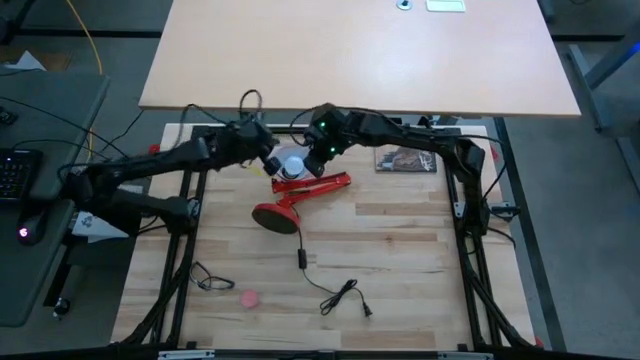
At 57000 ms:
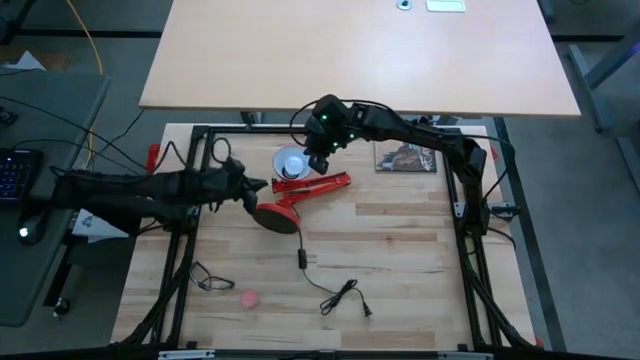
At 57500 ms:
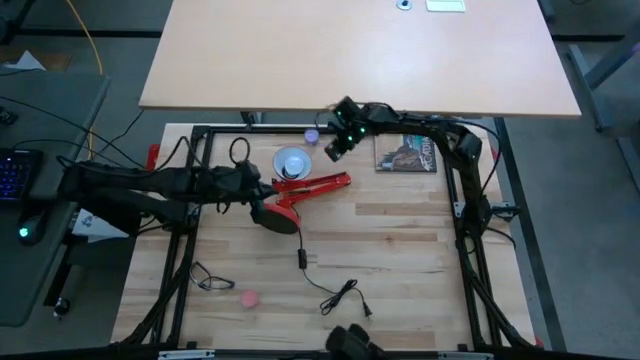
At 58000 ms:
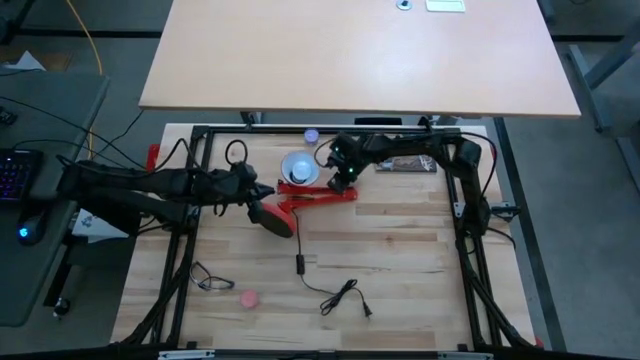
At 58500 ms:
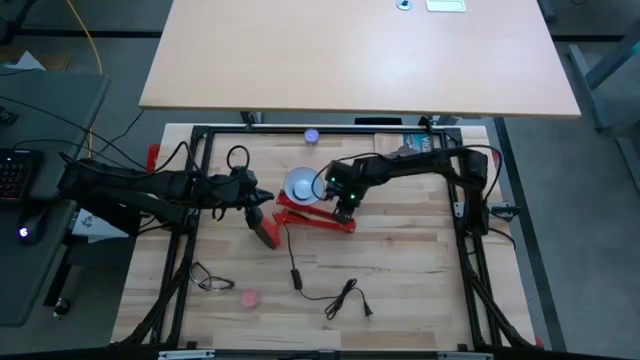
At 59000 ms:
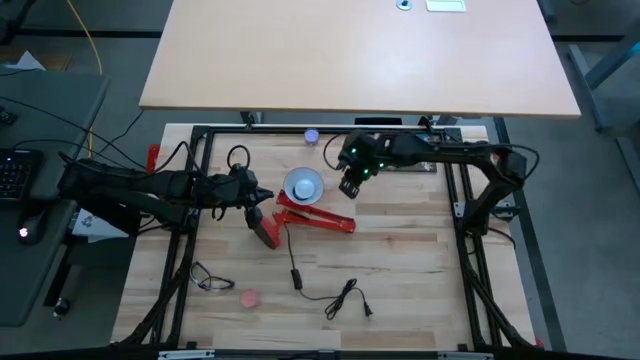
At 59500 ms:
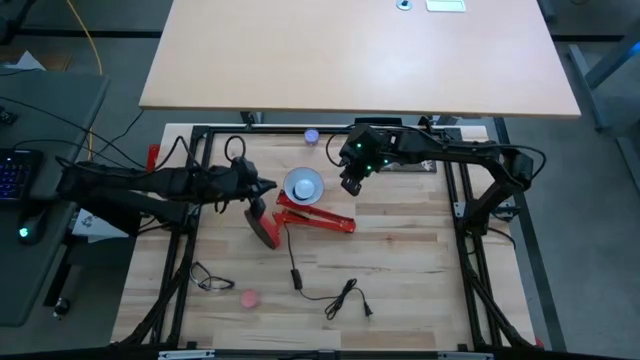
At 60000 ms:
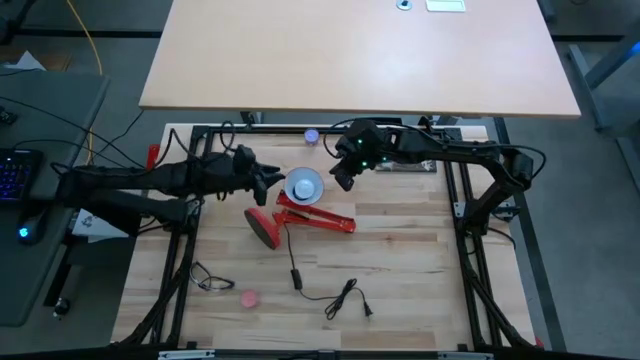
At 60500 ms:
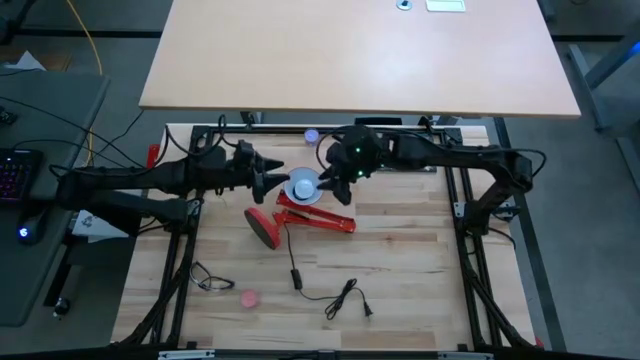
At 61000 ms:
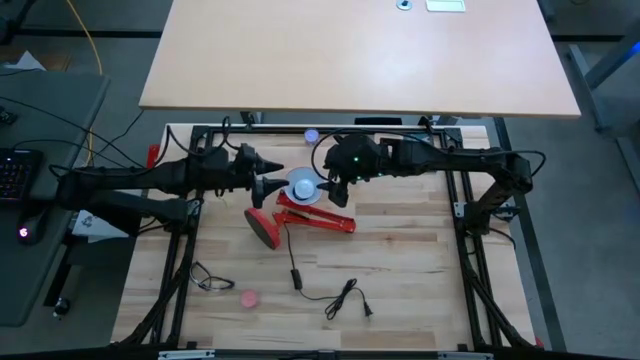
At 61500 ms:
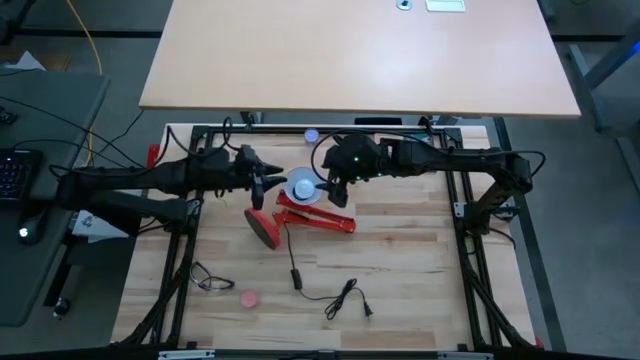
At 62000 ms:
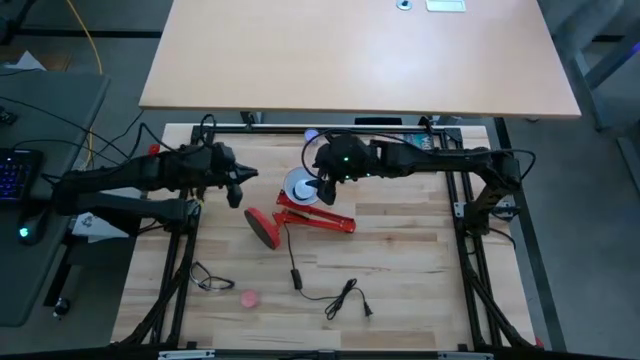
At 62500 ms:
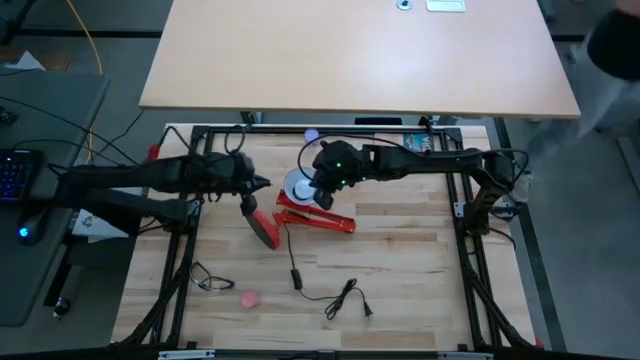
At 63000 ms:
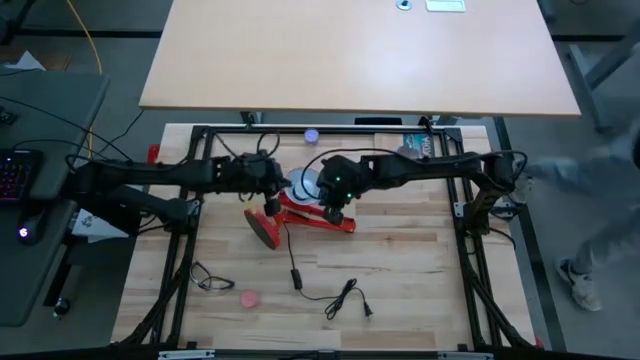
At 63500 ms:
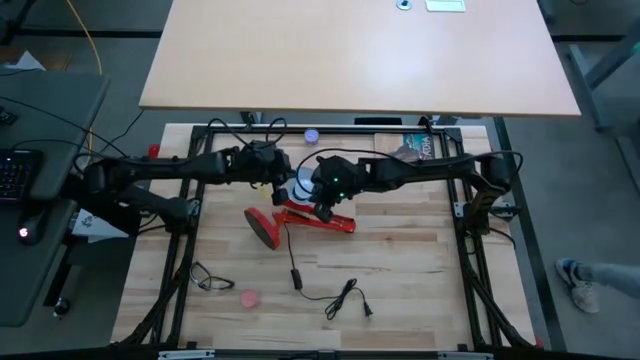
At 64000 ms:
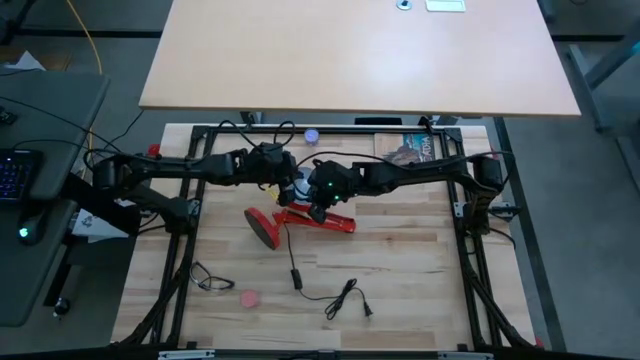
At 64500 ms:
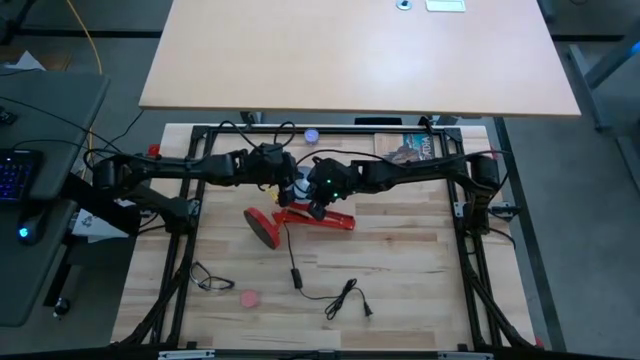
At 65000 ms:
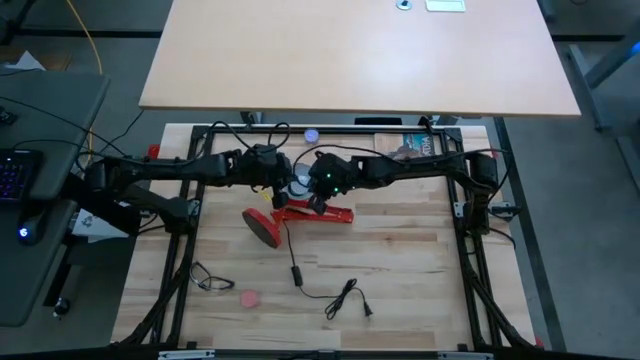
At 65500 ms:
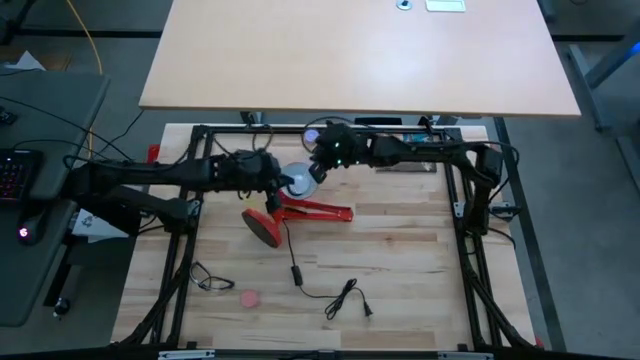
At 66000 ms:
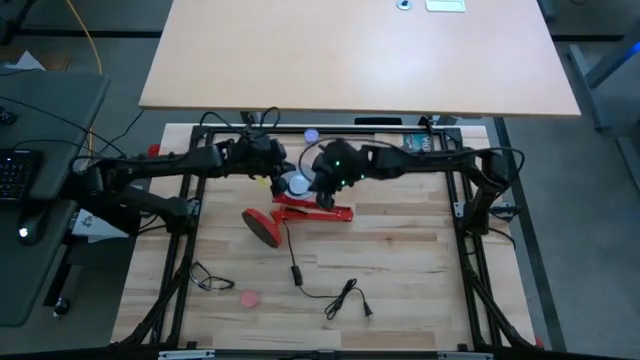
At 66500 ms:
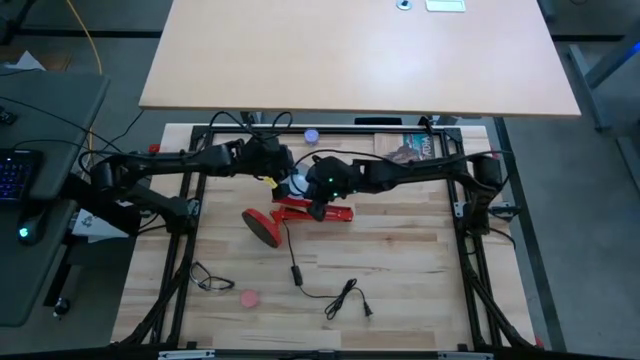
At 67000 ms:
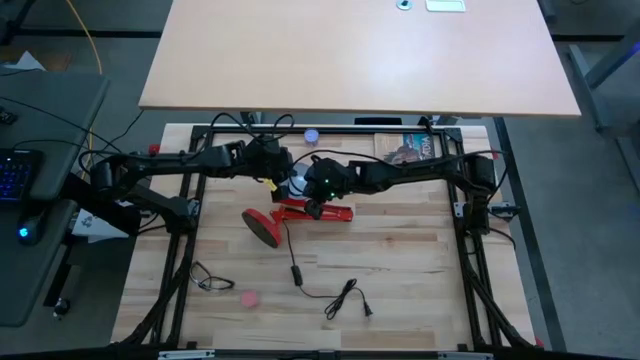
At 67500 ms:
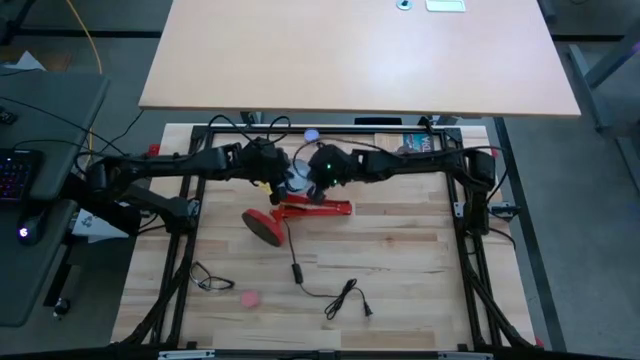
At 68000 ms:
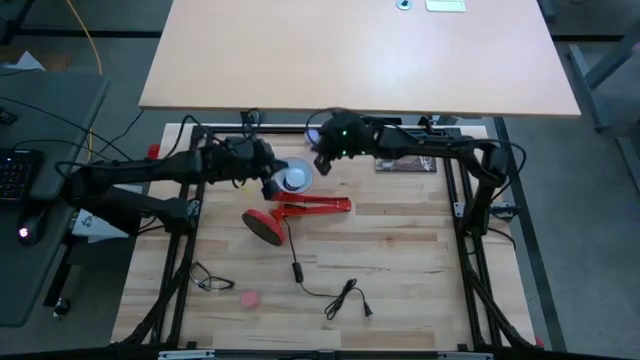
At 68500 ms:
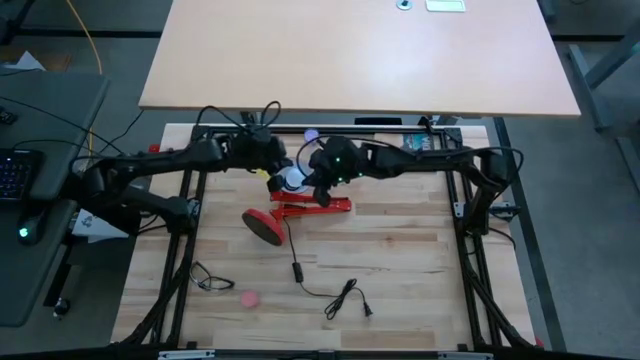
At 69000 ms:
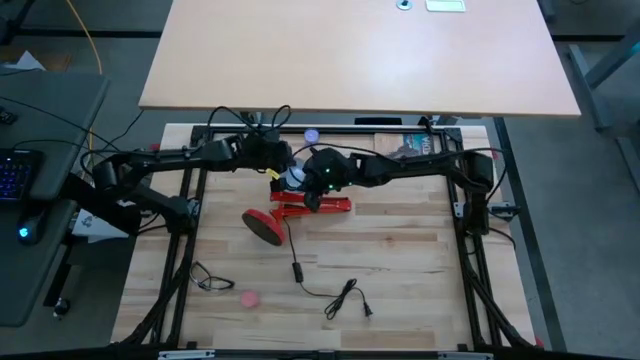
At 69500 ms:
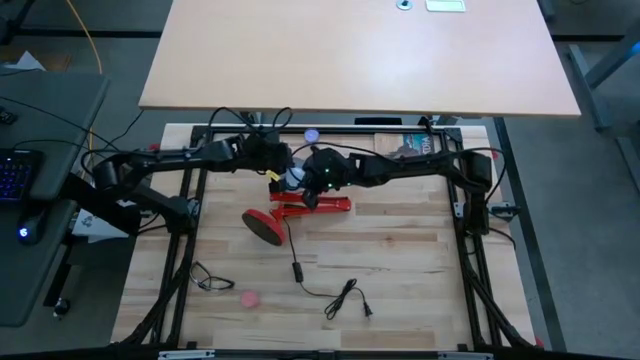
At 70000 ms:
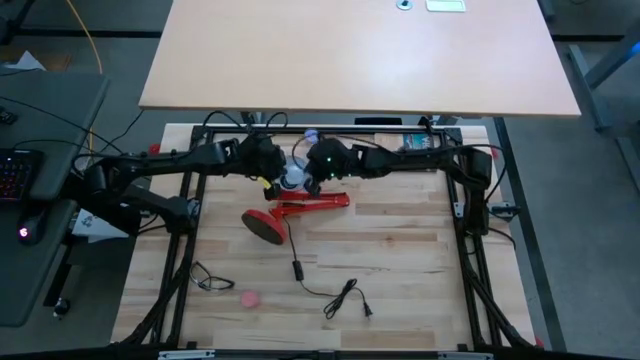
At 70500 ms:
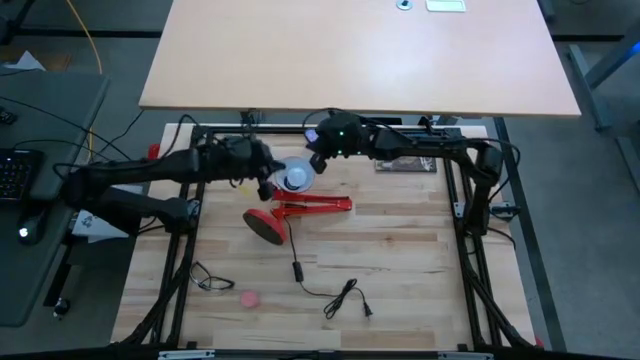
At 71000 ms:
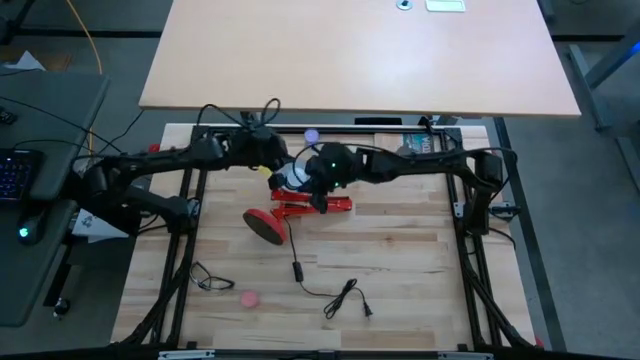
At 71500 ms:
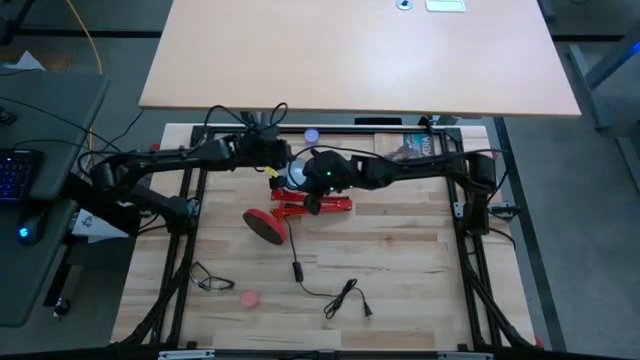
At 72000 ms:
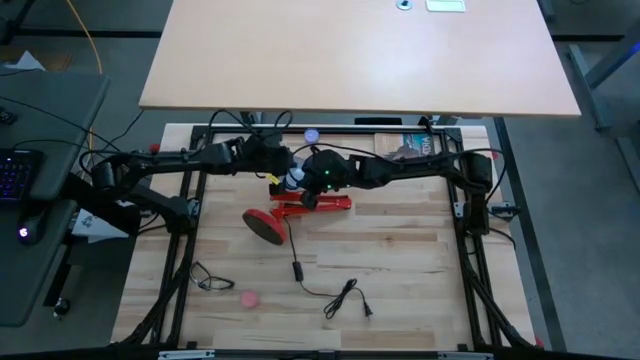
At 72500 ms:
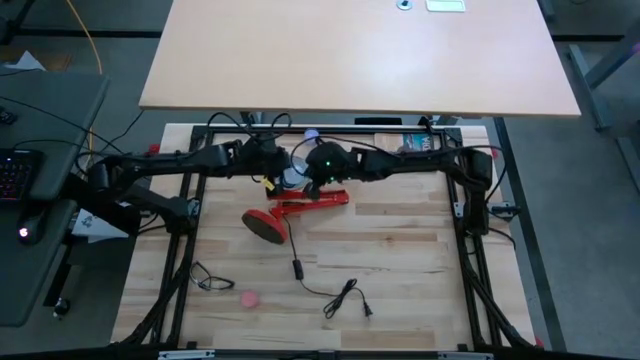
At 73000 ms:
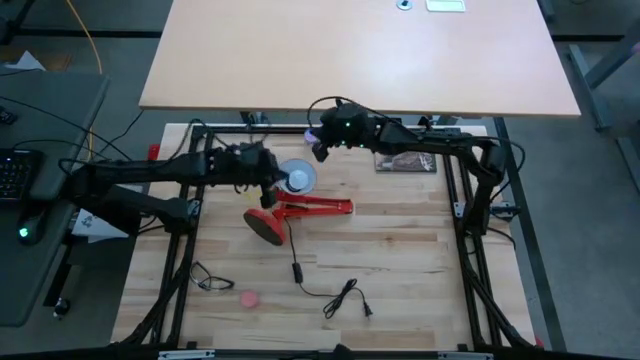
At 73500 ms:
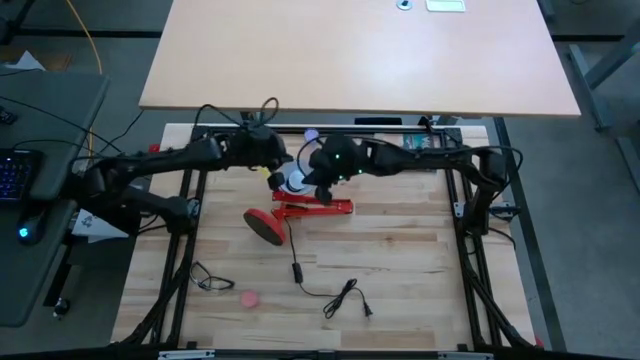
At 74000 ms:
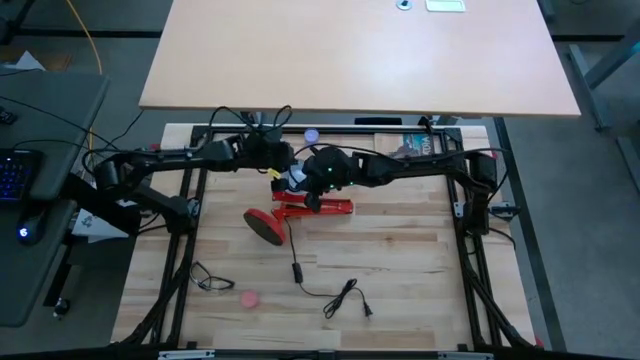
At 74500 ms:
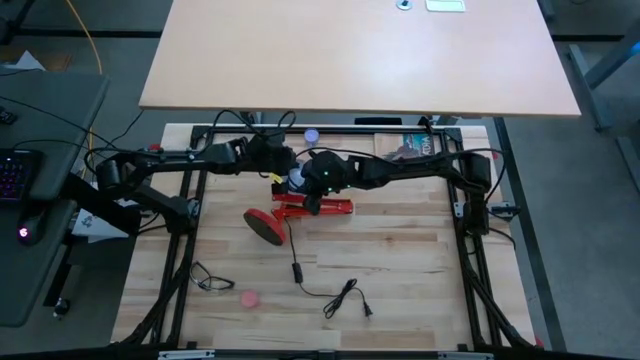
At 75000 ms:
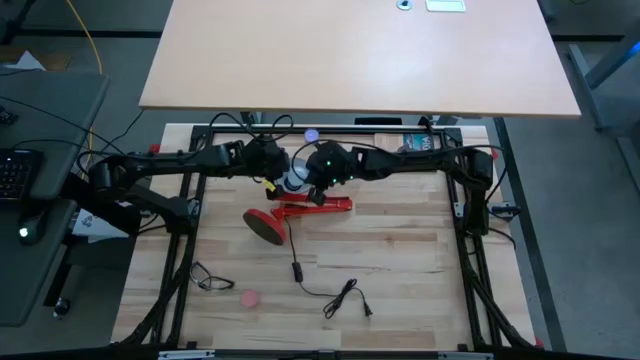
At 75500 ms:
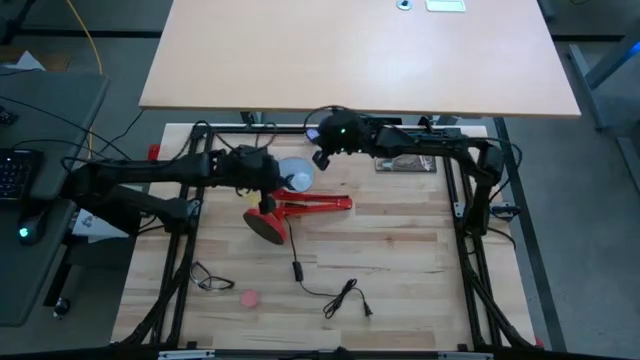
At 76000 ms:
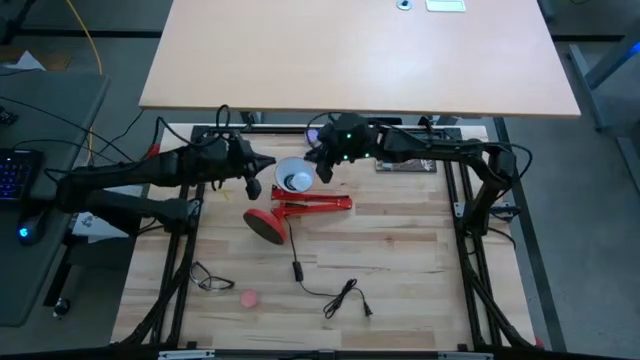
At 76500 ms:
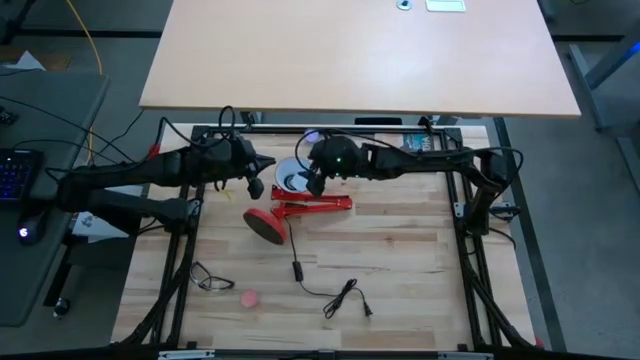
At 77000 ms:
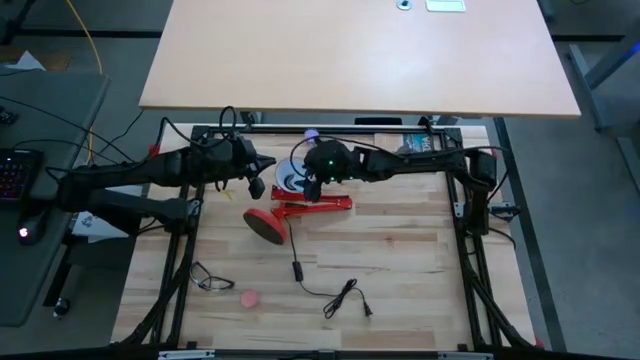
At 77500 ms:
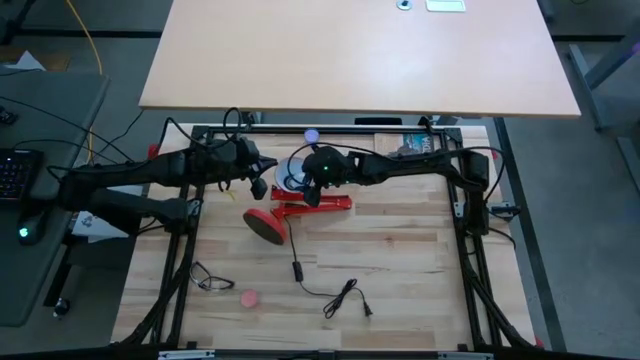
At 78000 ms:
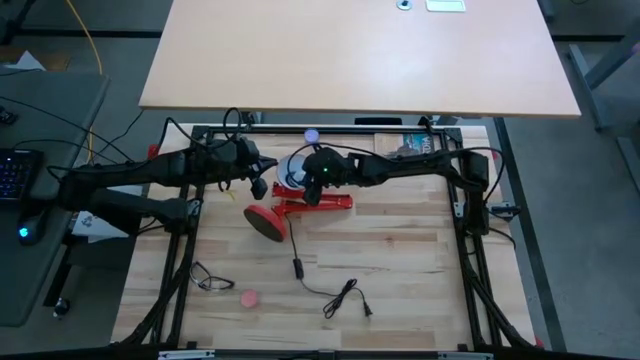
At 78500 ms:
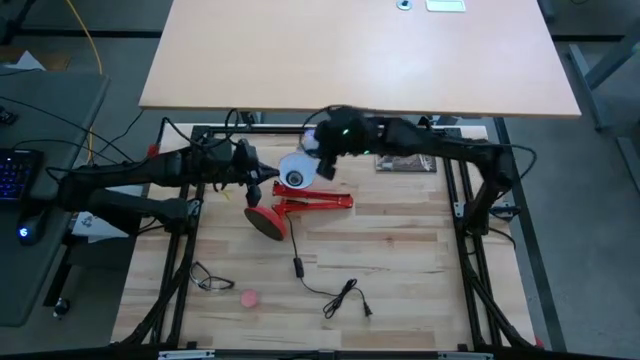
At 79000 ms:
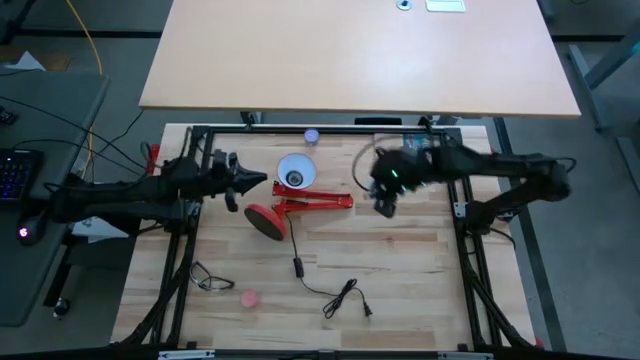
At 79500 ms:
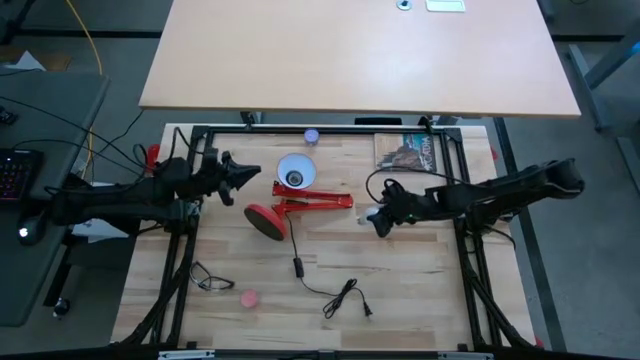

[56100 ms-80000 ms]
Task: Screw lightbulb
Remove the lightbulb from the desk lamp
